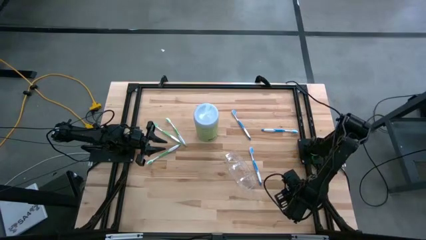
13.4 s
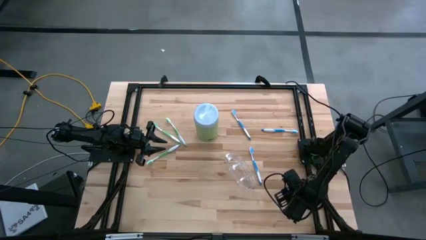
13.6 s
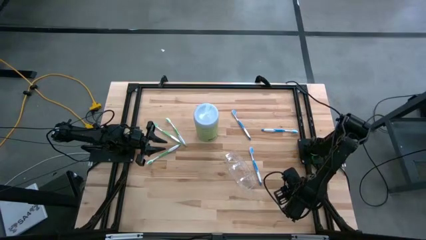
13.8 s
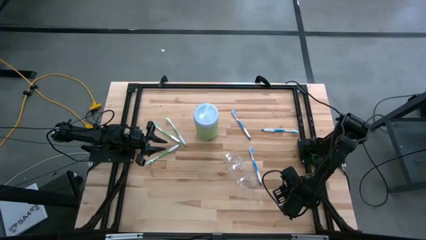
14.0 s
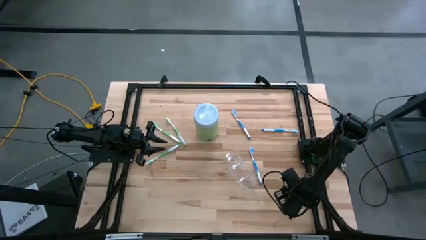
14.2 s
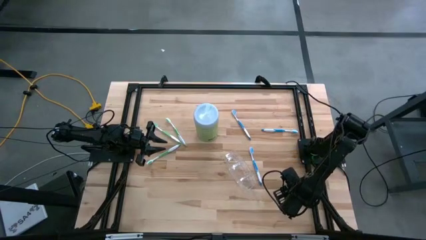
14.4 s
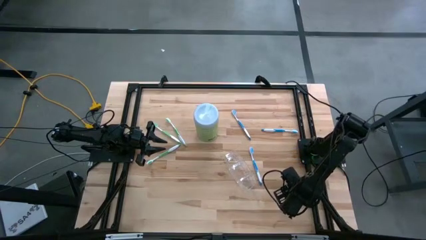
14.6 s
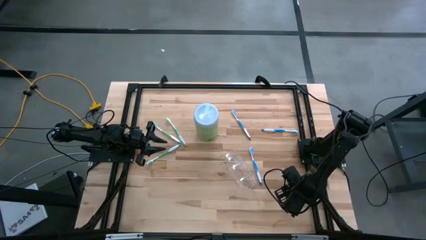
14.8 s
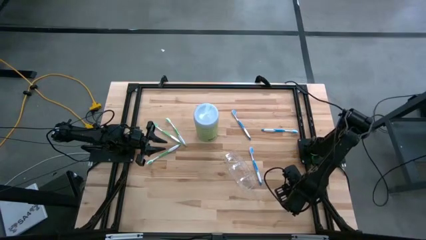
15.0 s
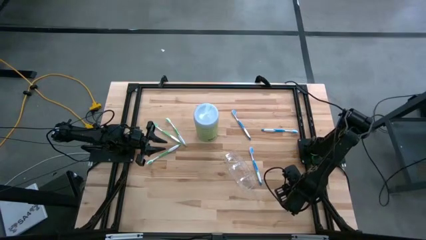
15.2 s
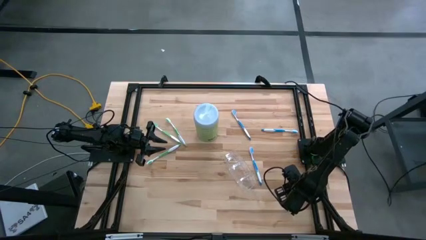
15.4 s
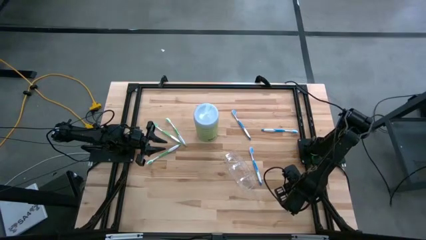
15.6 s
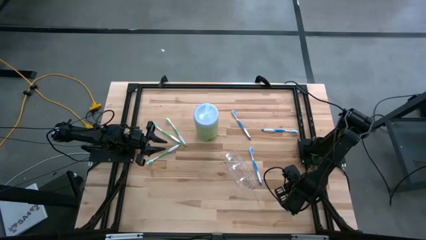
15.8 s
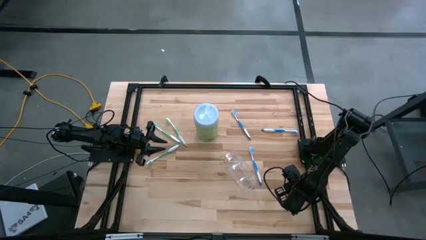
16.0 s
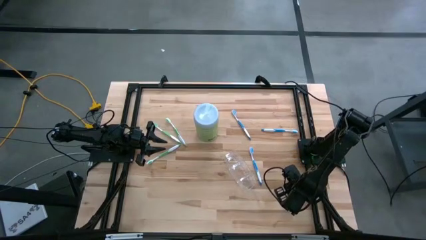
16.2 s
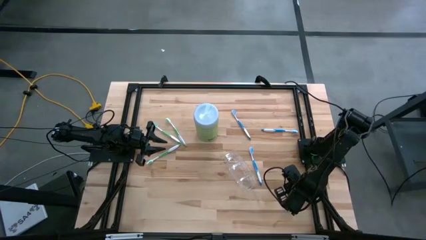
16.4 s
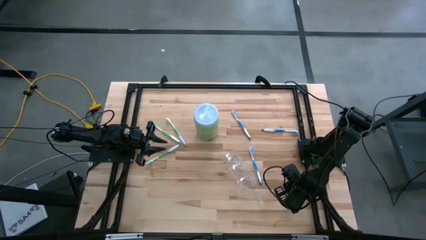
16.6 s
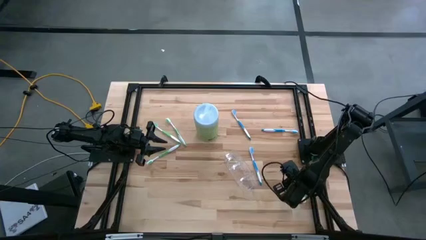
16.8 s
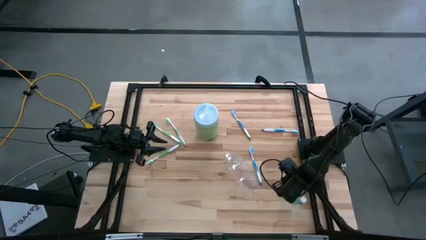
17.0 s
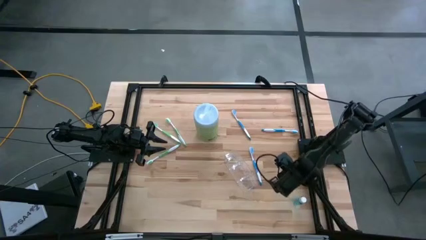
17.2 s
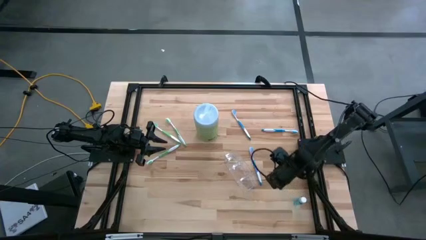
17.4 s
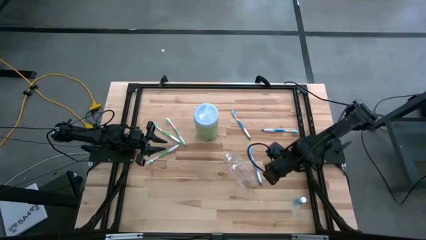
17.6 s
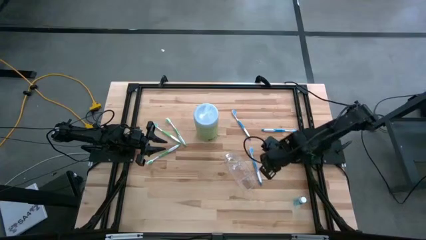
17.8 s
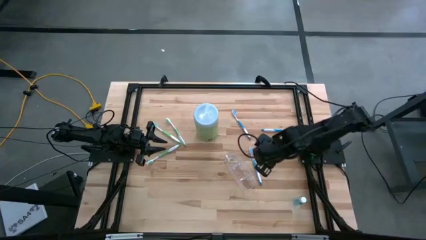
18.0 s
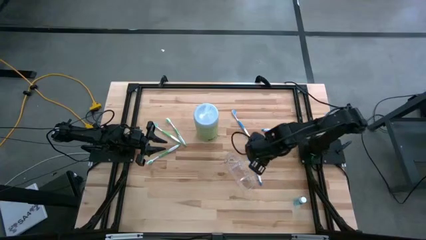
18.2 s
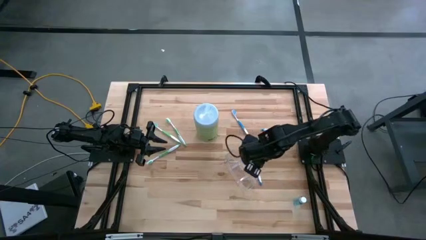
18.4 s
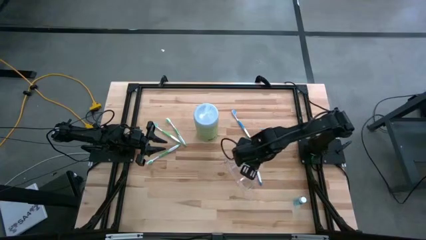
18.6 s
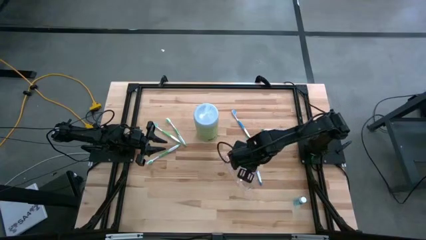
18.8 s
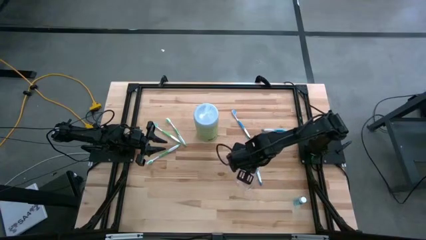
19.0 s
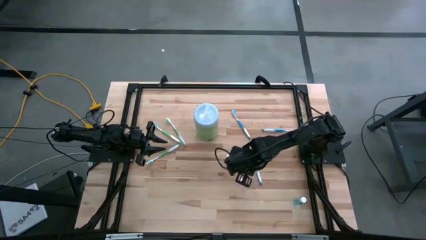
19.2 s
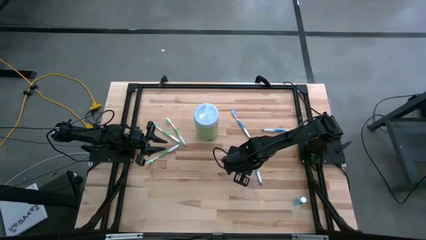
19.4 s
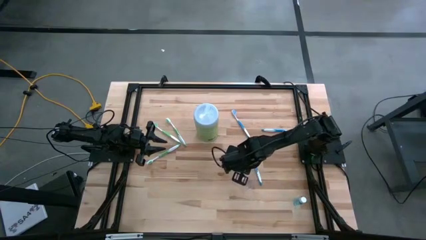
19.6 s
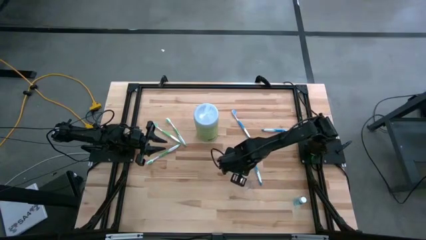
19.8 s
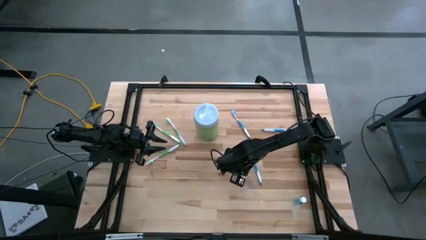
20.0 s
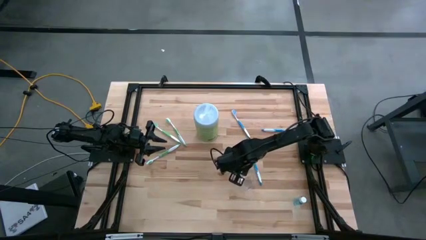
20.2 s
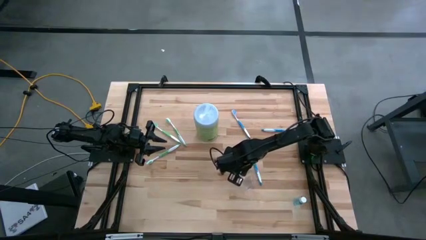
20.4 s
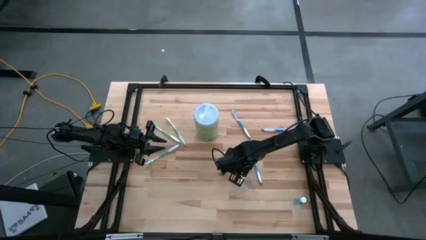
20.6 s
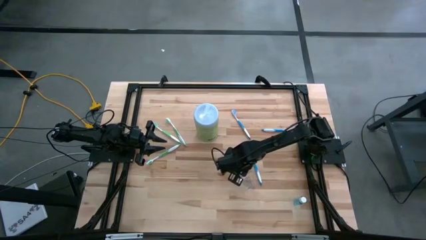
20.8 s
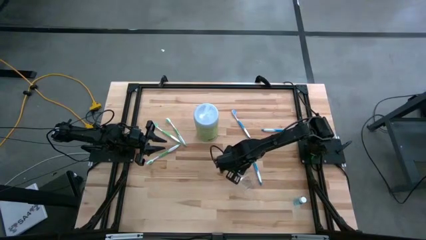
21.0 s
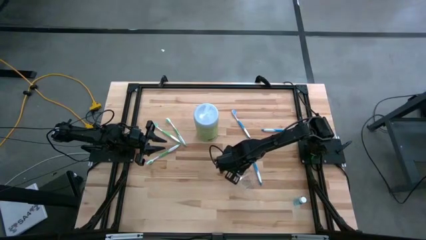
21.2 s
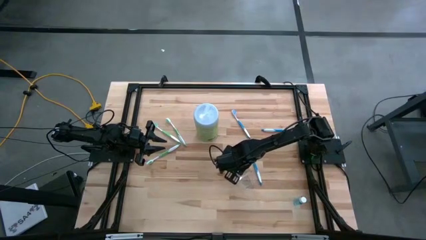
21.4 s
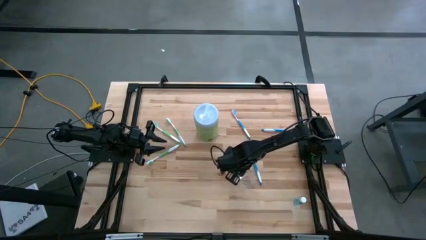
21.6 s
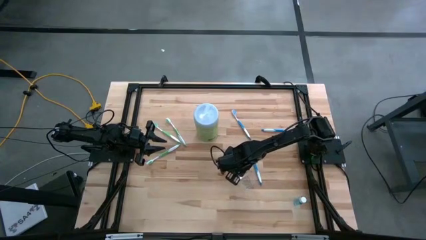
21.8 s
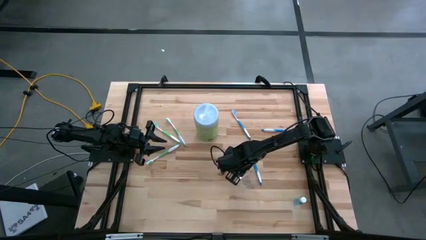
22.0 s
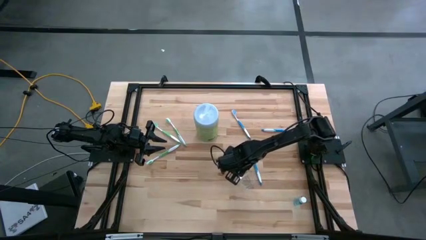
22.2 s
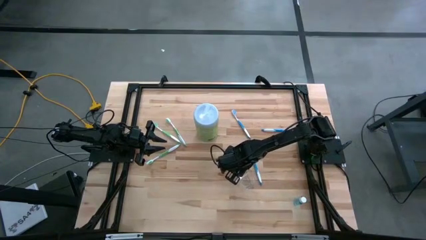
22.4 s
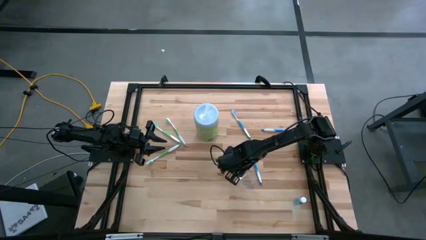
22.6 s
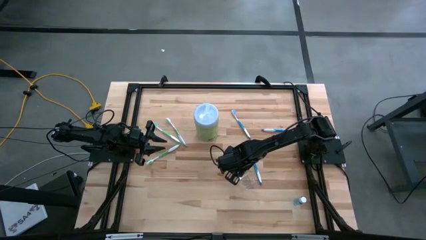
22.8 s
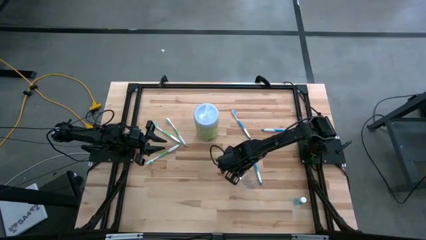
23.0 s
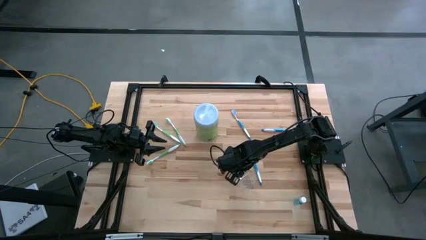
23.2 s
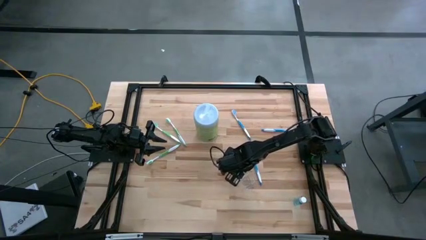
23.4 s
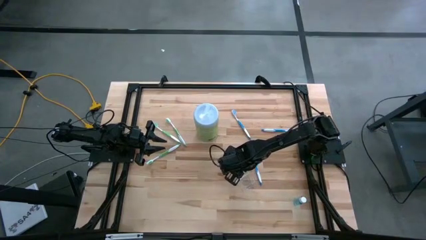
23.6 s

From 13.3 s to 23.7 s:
Task: Pick & Place toothbrushing station
Put the top mouthwash into the transparent organizer

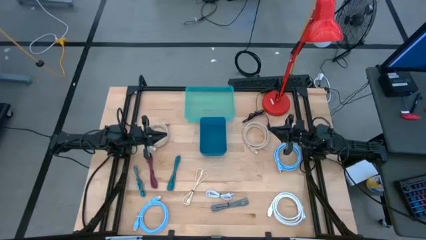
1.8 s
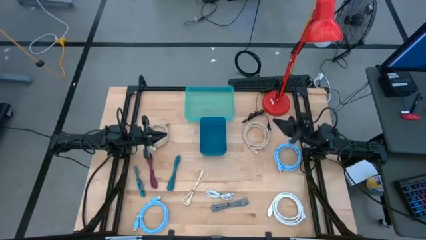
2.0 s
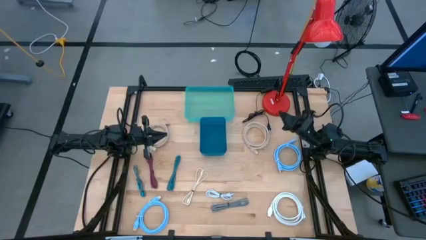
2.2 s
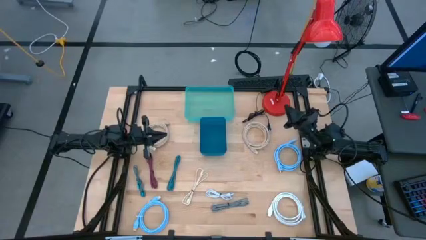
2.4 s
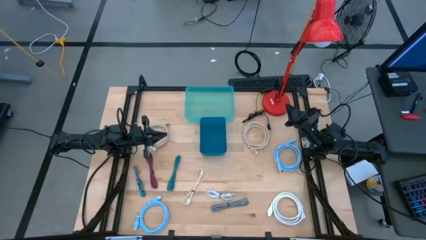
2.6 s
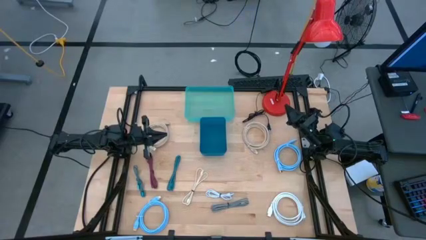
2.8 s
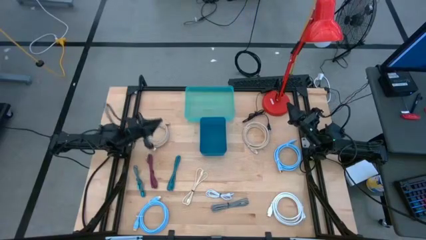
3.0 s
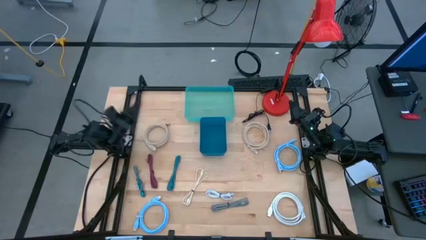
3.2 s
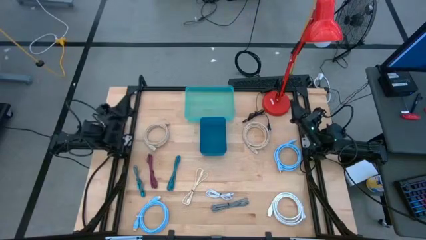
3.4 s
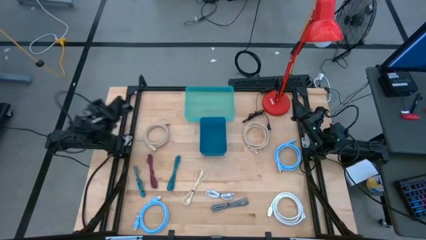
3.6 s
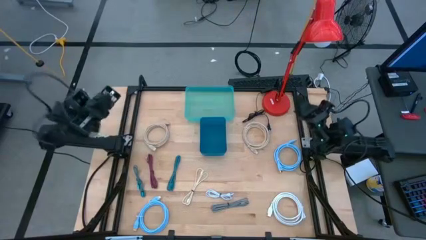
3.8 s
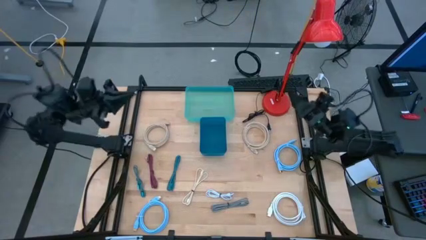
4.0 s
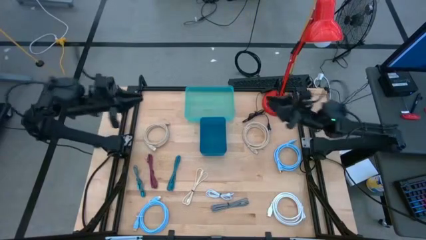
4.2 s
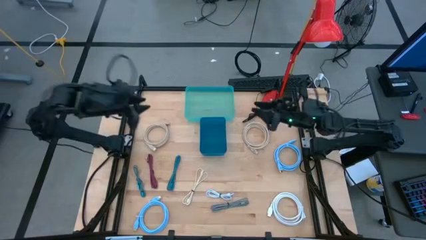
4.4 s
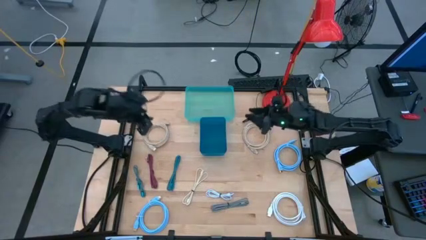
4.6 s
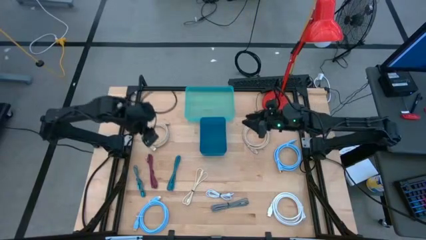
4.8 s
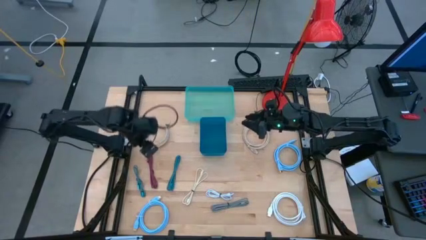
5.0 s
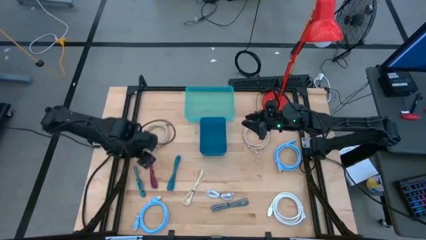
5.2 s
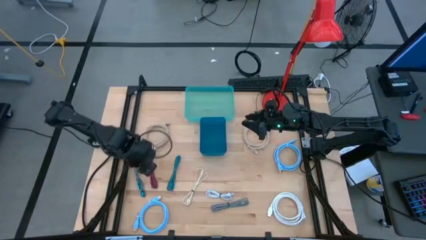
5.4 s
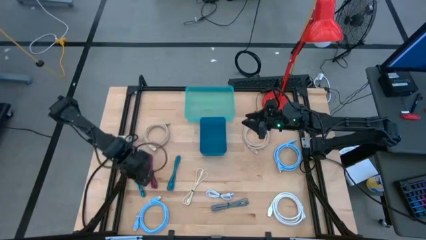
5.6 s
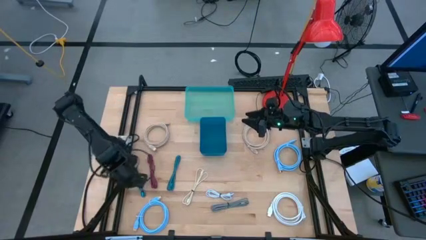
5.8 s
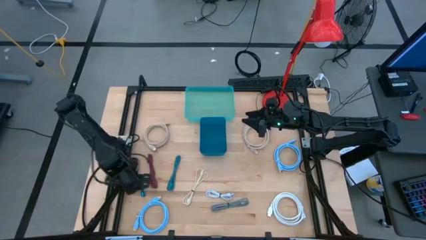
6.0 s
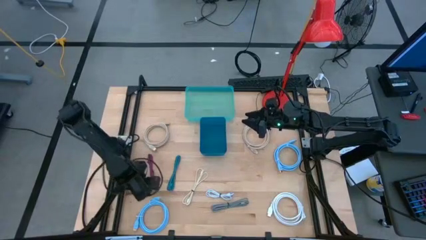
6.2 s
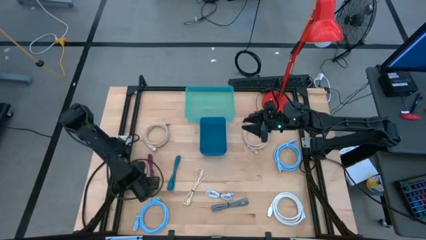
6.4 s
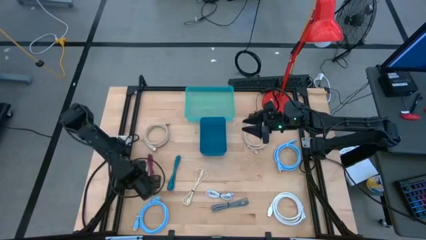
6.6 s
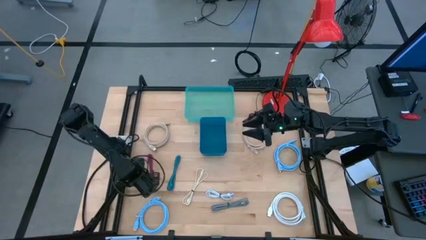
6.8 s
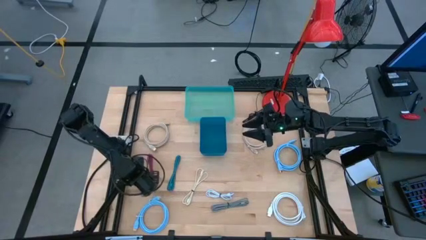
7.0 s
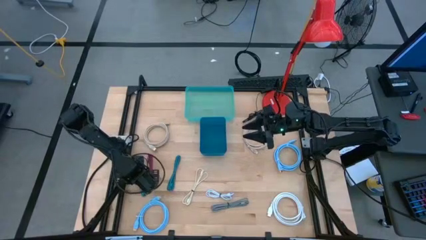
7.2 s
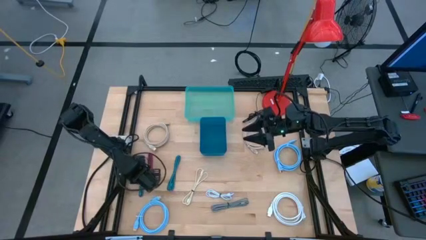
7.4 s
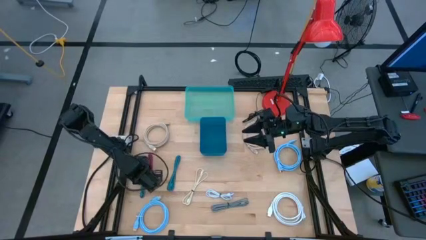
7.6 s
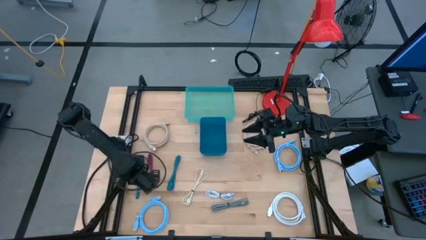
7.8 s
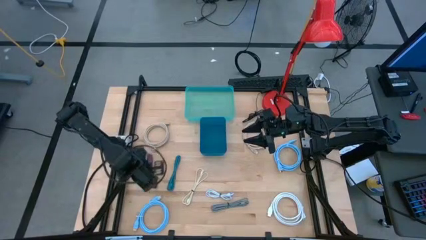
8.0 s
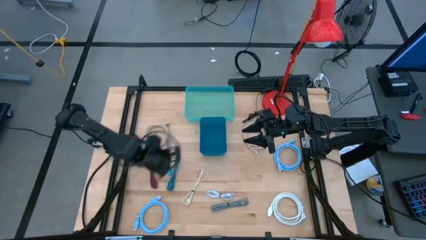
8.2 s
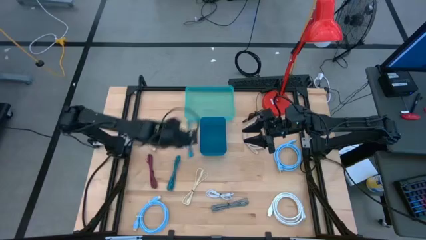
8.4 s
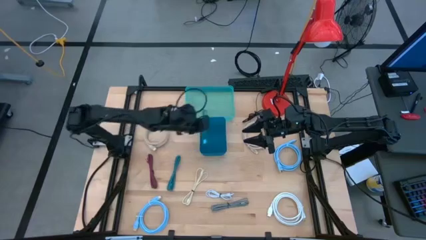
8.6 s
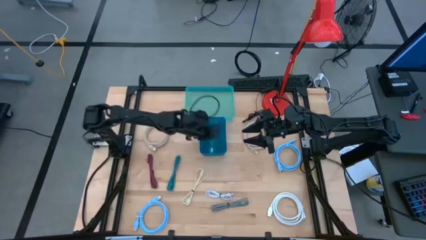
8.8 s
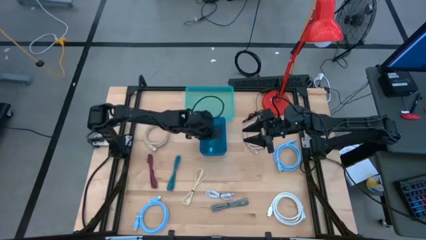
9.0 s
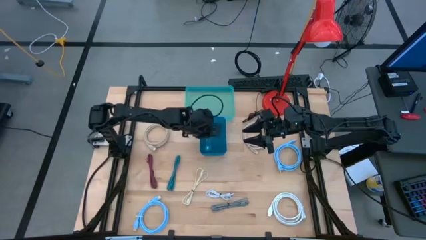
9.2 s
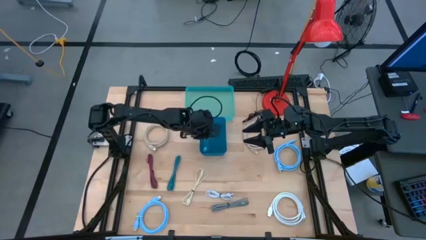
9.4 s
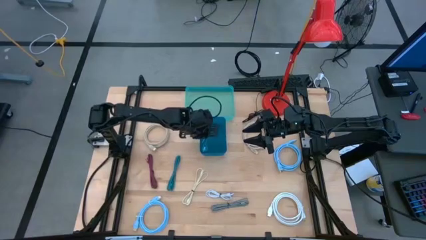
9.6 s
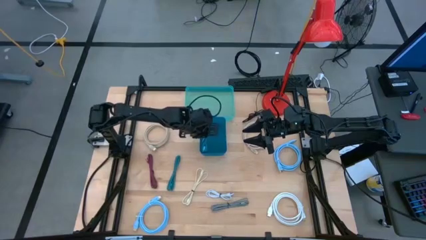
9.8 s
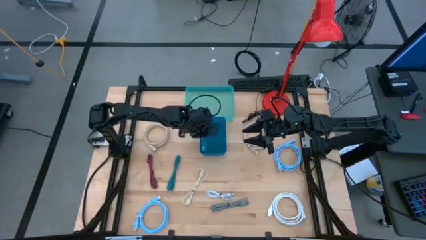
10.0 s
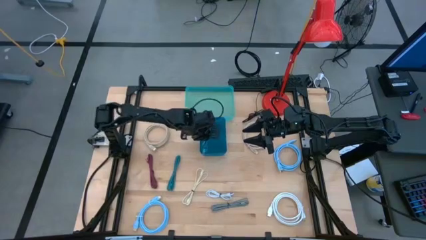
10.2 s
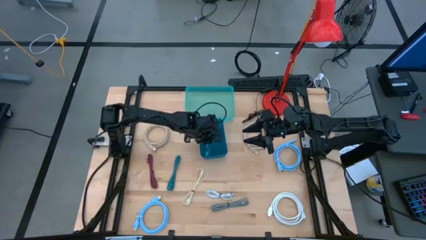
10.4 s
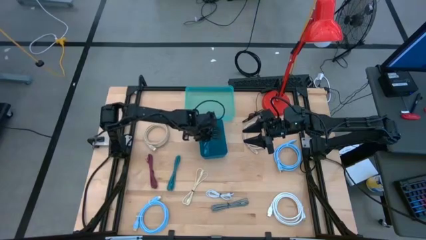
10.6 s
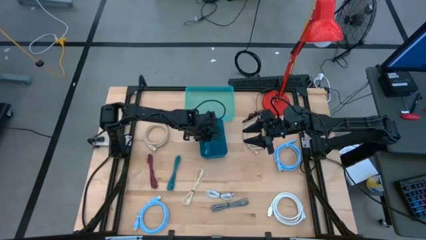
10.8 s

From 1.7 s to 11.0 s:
Task: Pick & Place USB Port
Put the left blue usb cable into the blue bin
